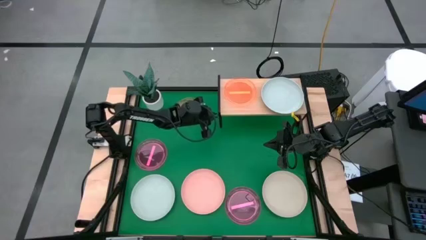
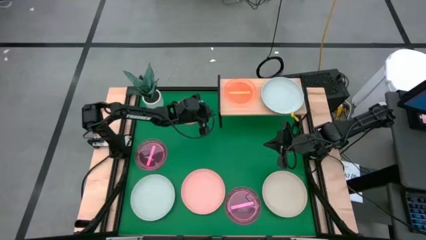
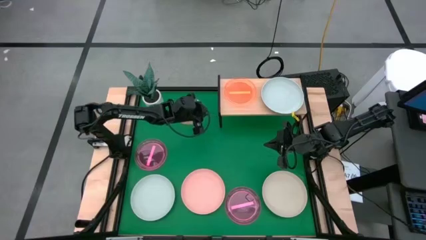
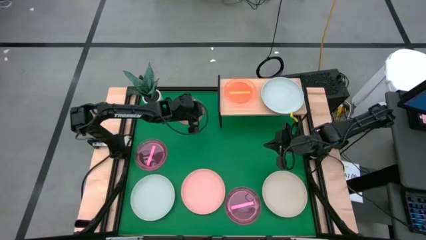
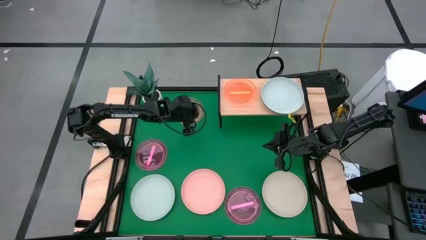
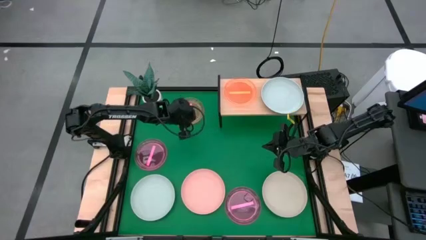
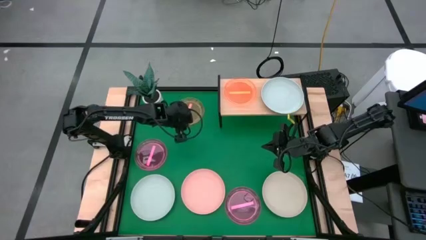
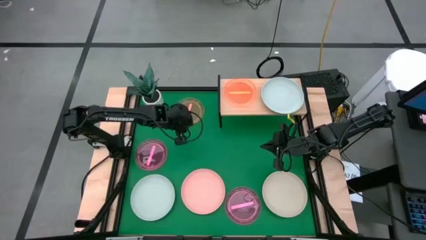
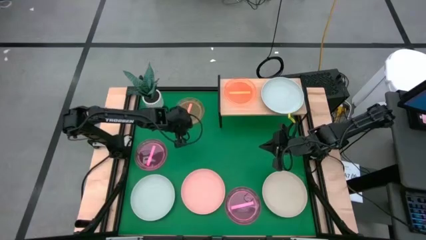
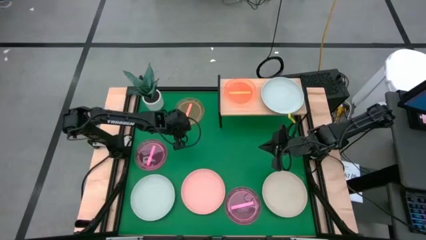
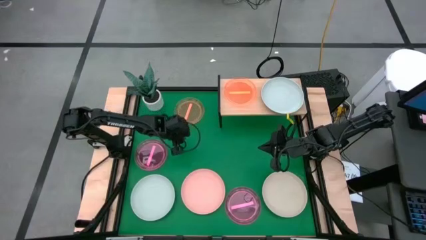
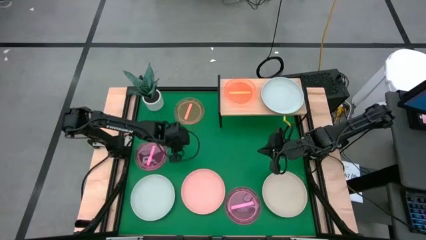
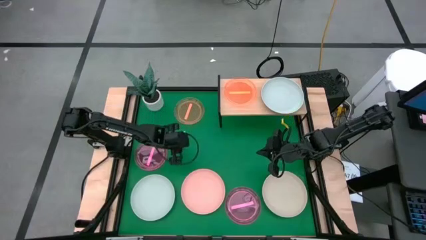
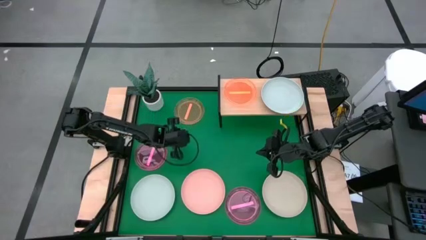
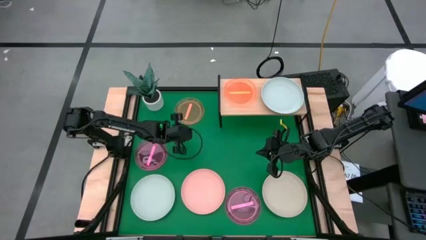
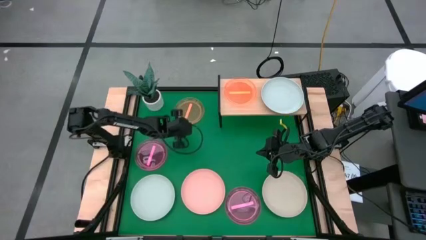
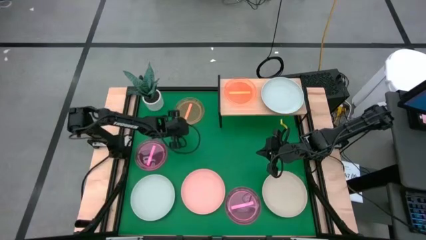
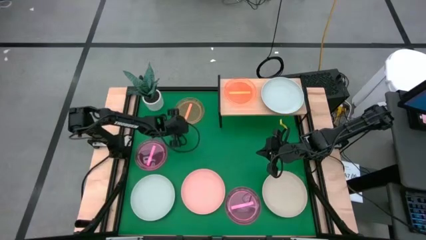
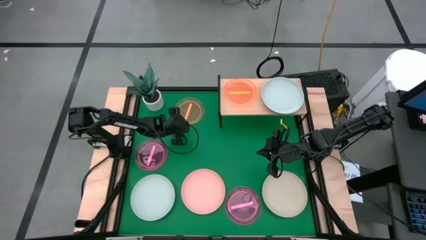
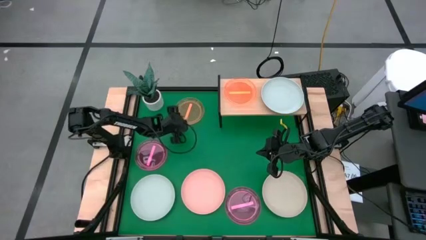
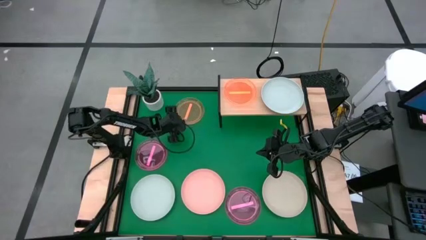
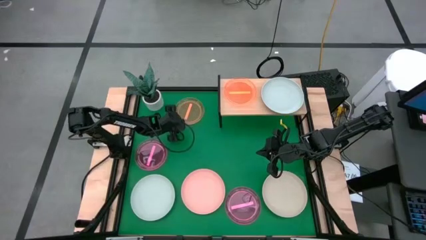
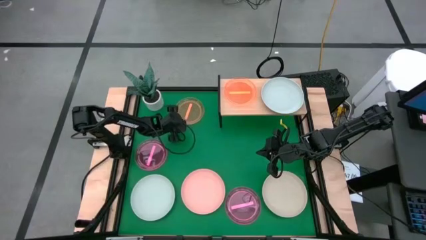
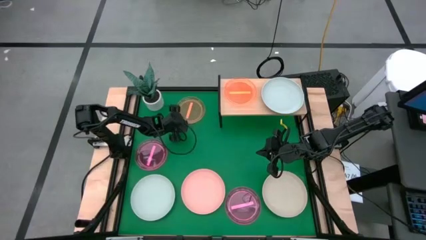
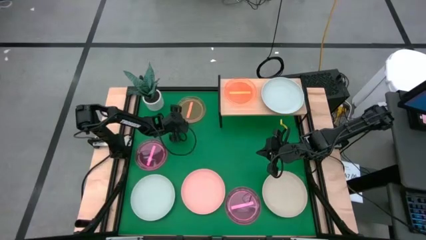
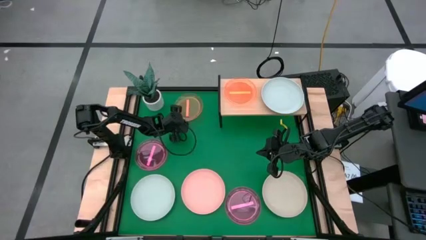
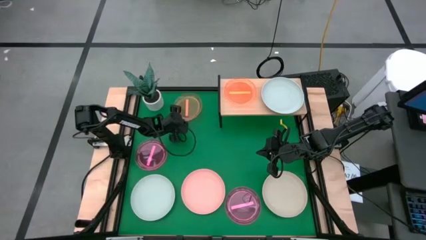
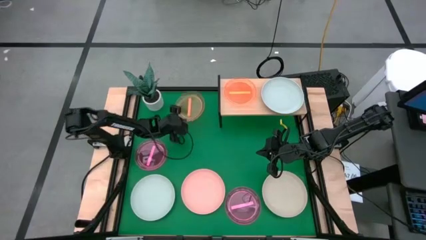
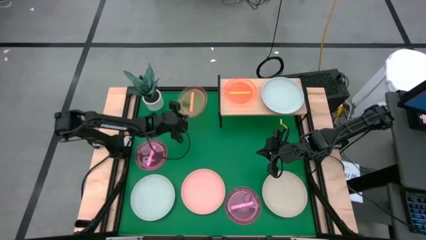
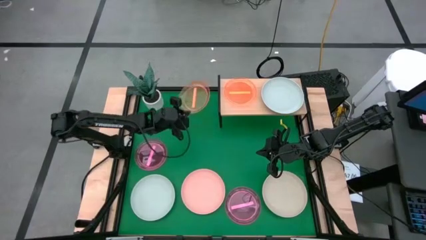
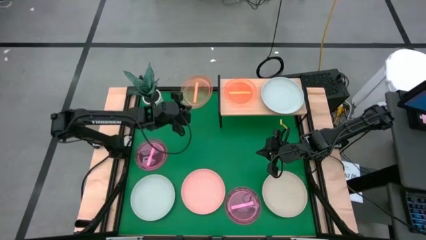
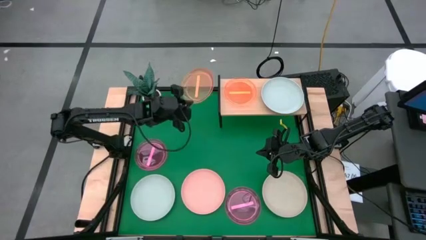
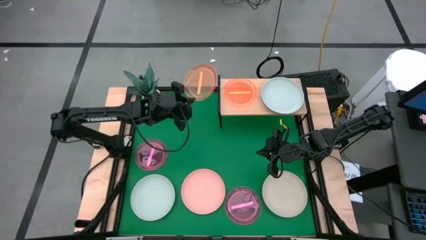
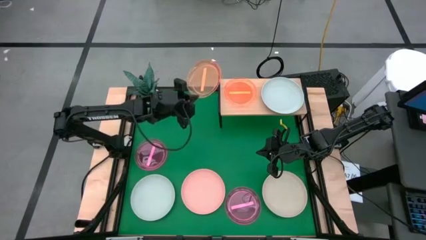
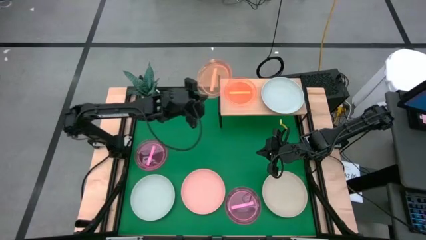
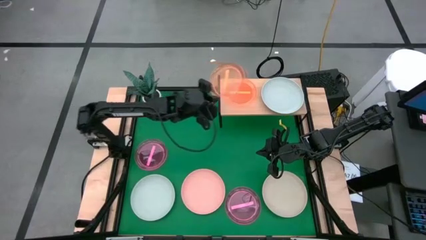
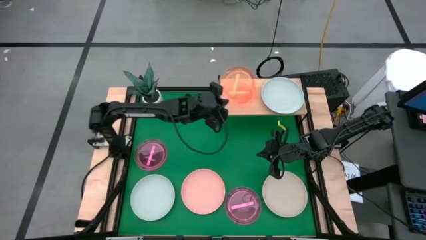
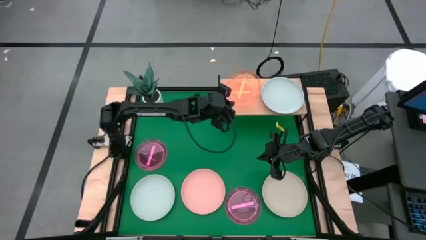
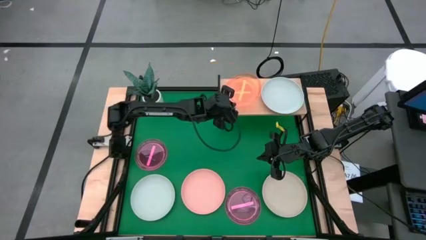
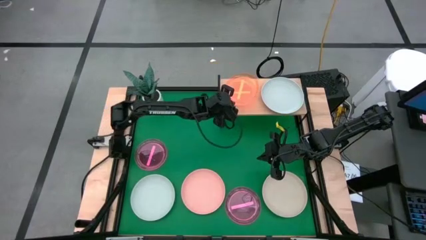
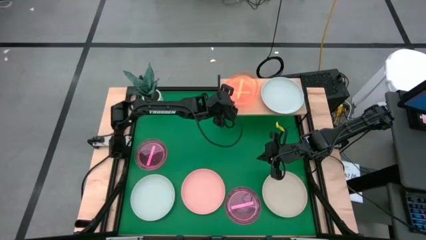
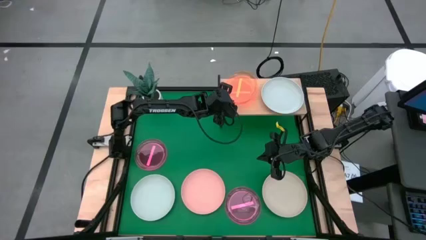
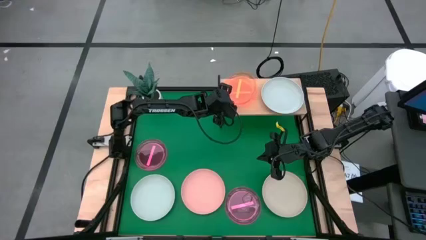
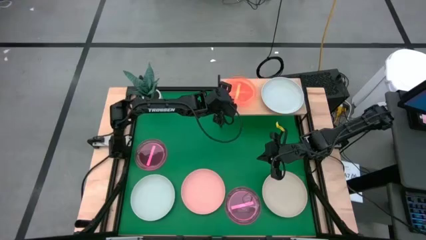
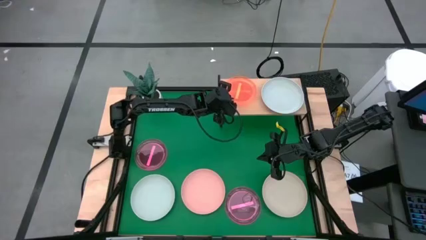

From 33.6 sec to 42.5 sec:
Task: Place and stack plates onto a shelf
Stack the small orange plate on top of the small orange plate on the shelf

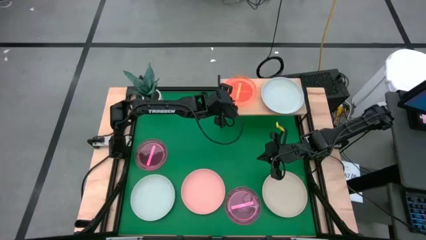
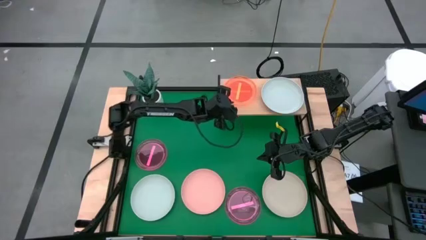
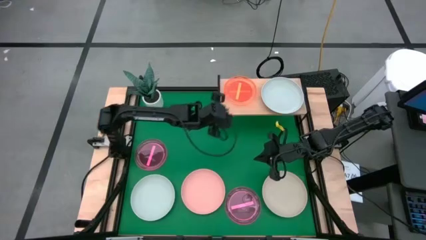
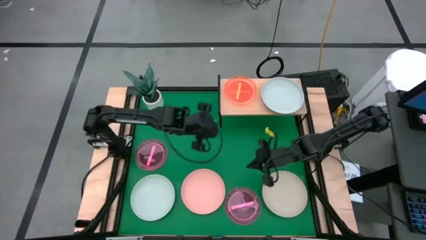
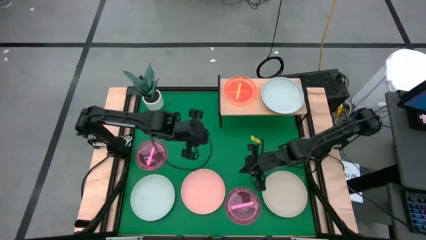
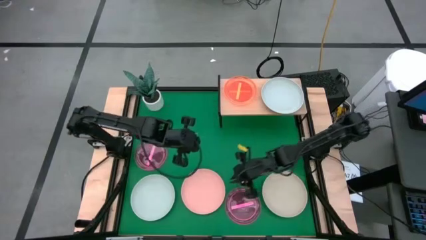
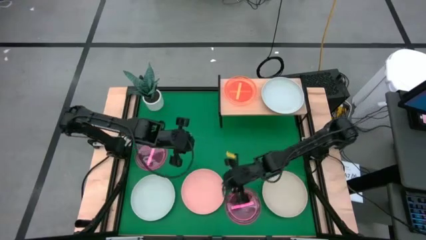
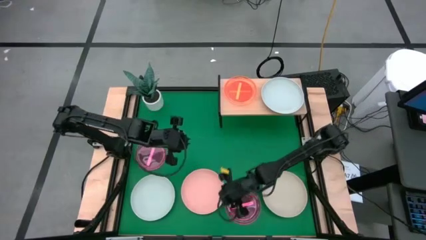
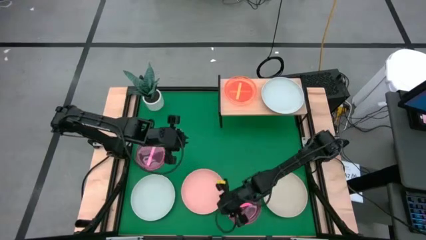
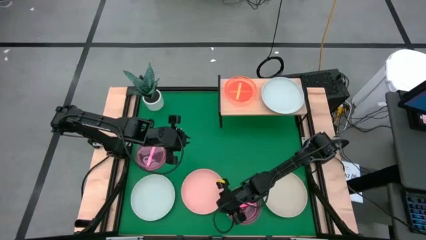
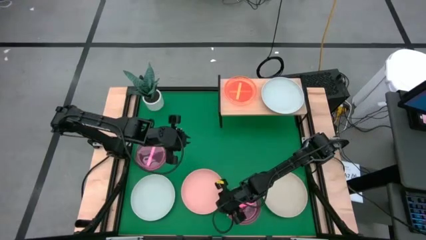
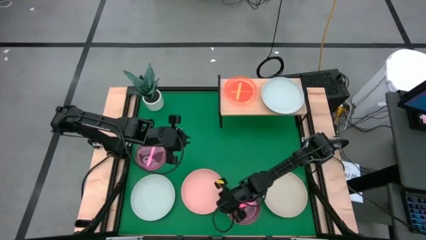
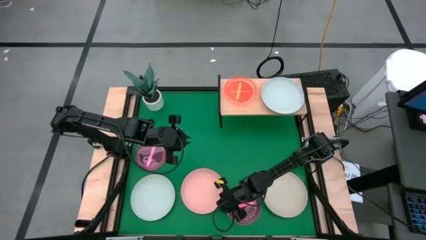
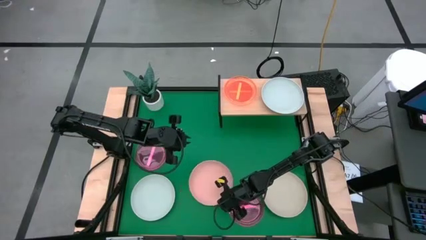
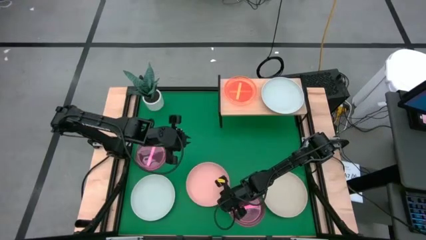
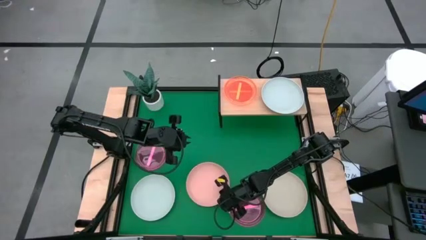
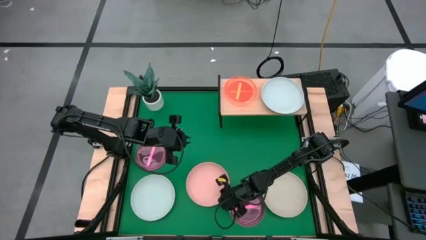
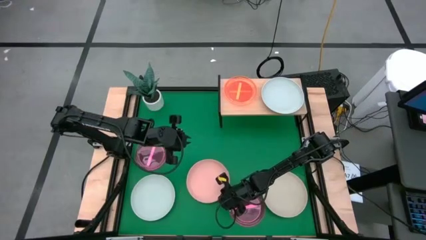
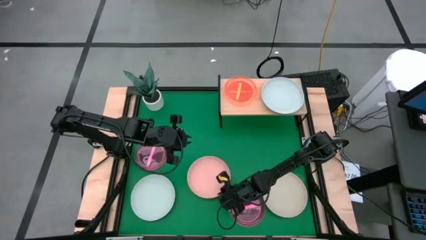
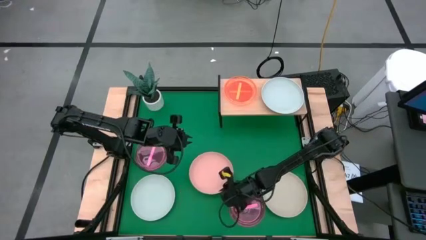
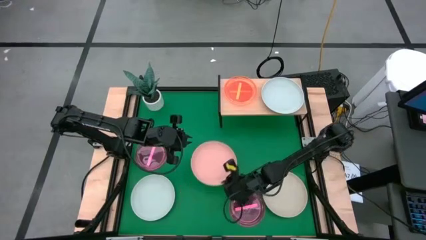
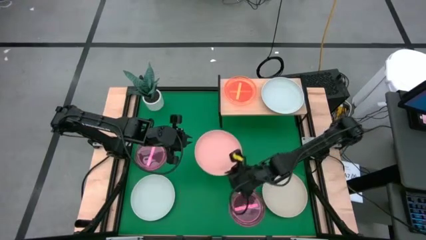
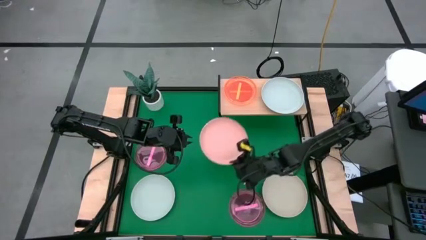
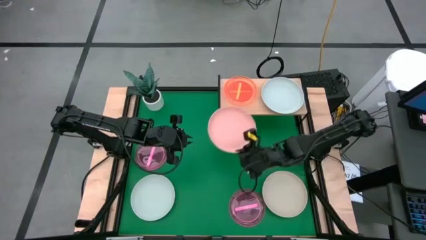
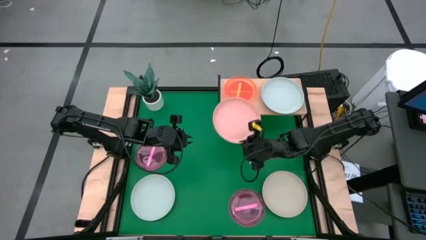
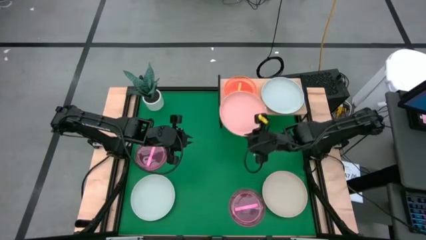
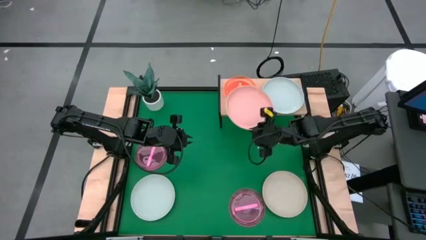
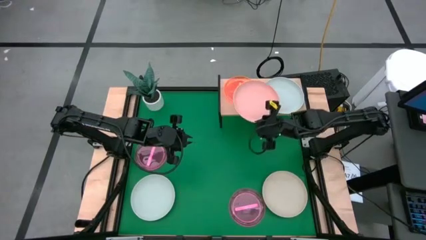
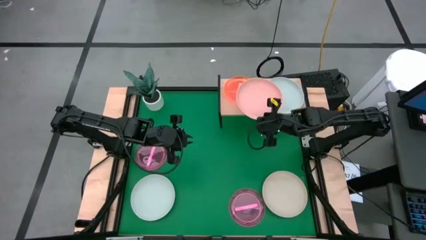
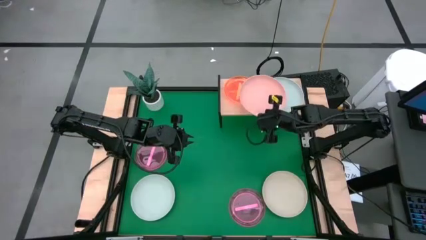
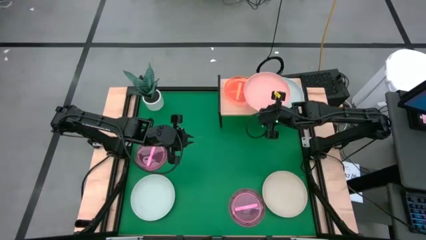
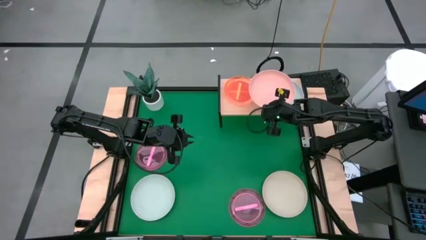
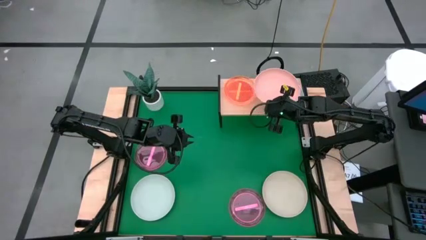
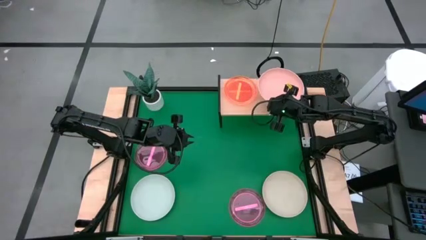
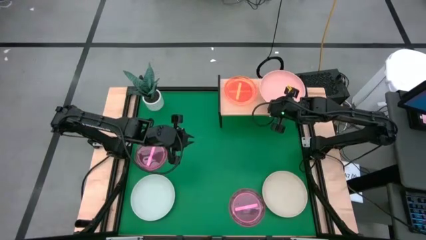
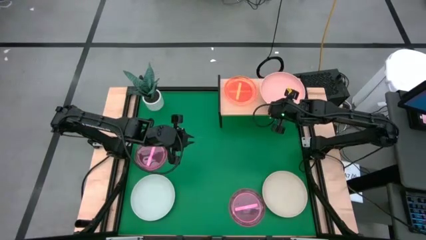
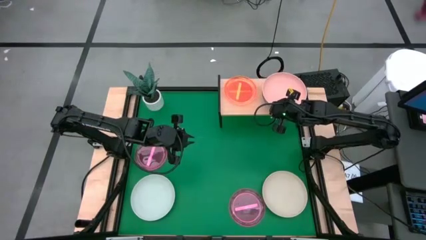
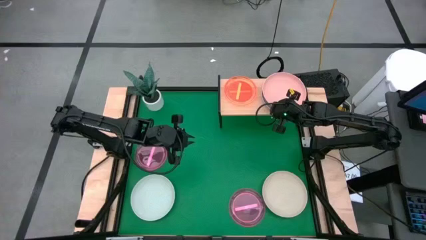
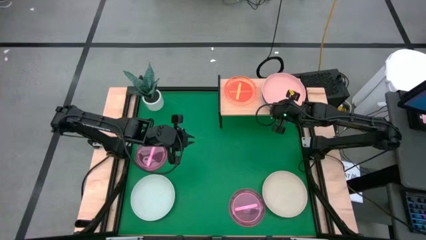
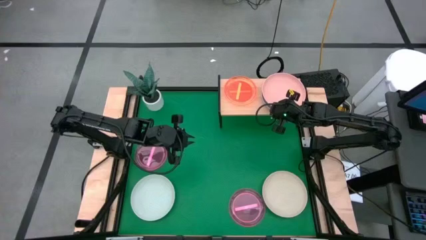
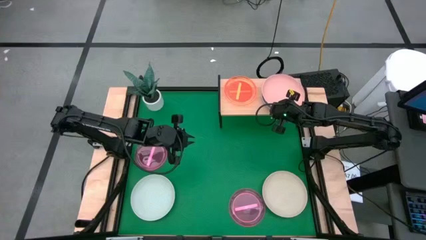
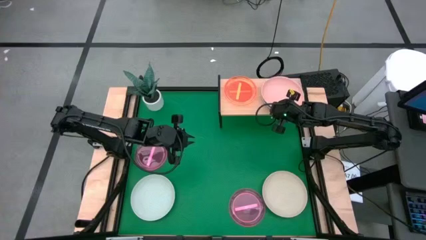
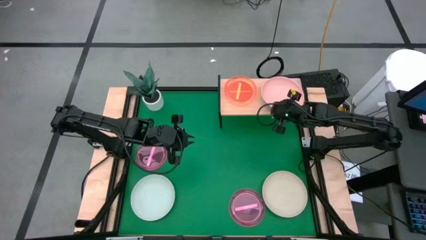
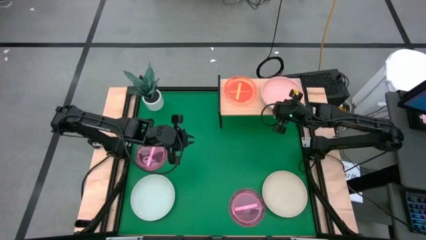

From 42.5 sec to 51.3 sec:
Stack the large pink plate on top of the large gray plate on the shelf
